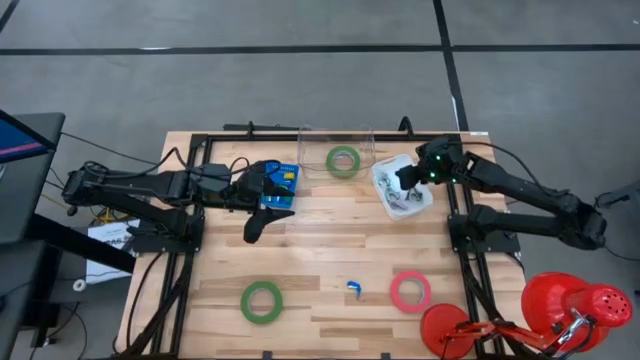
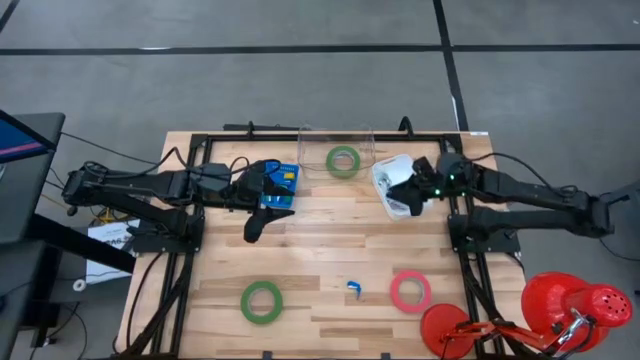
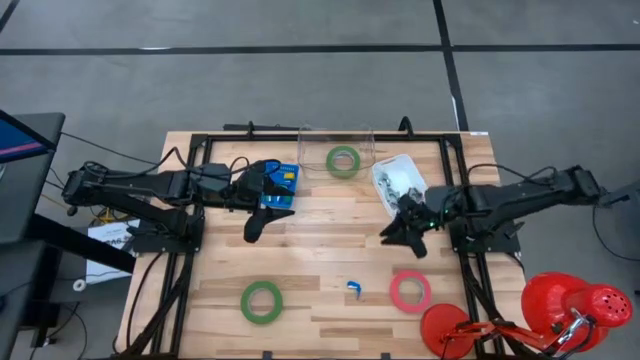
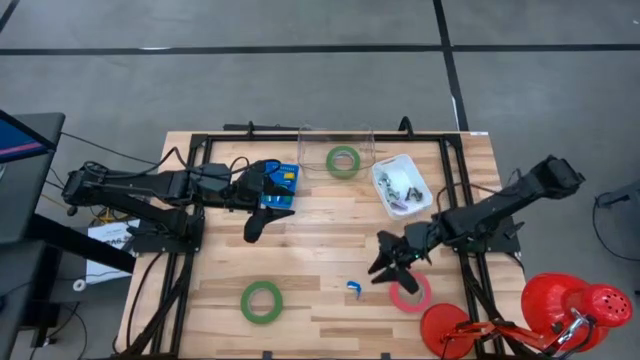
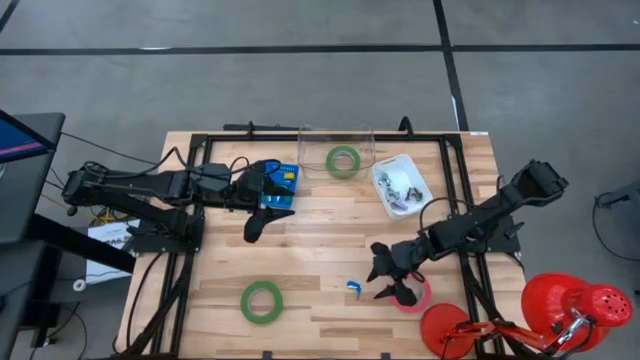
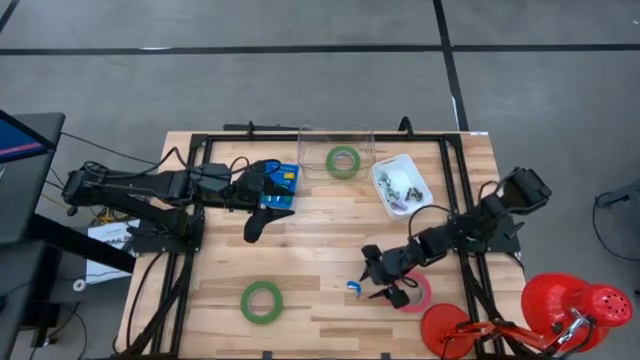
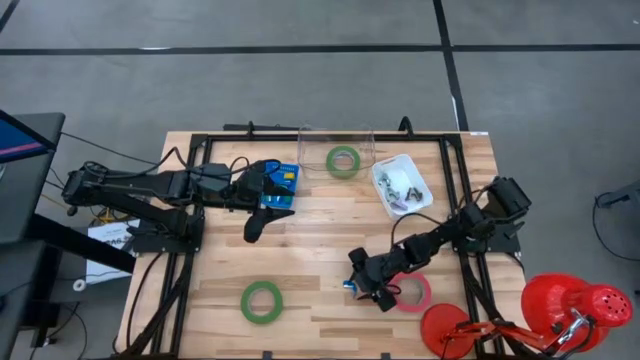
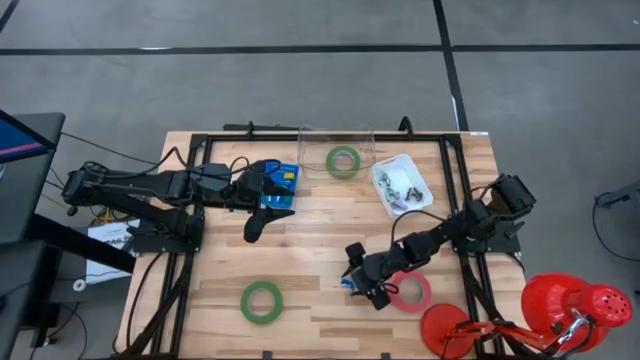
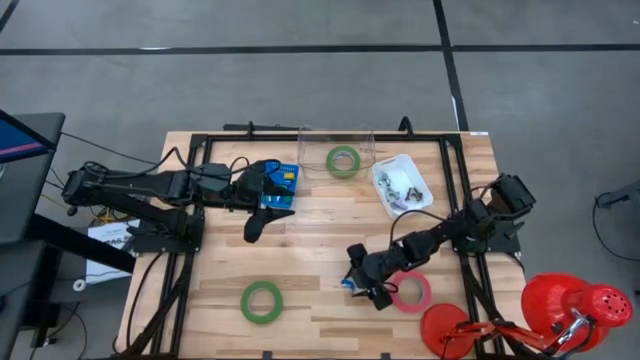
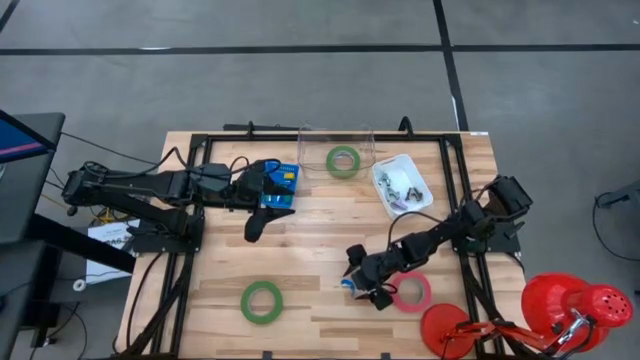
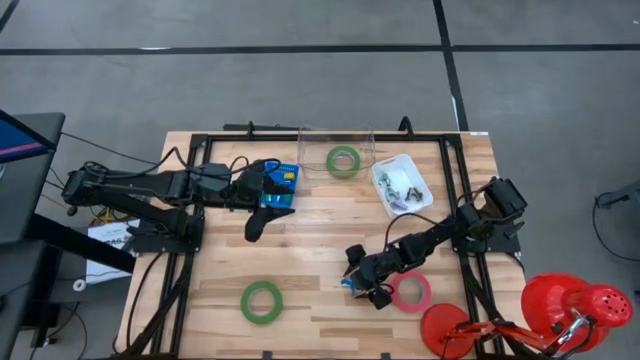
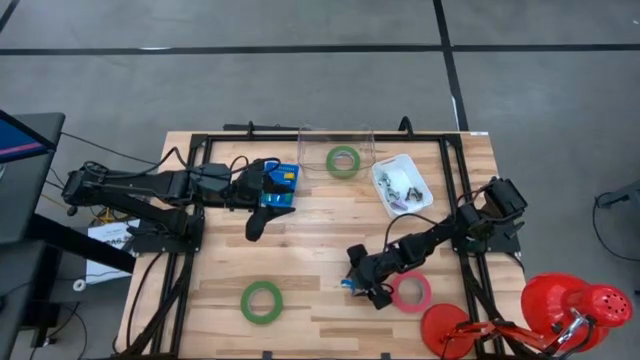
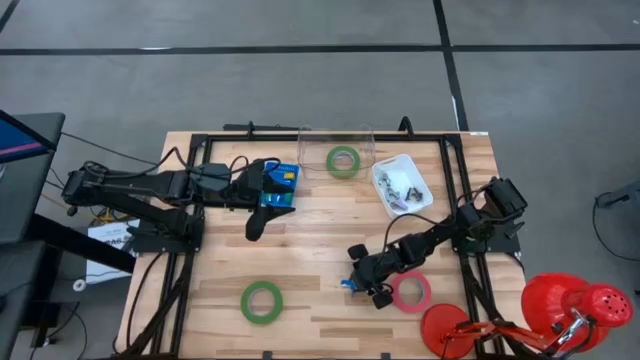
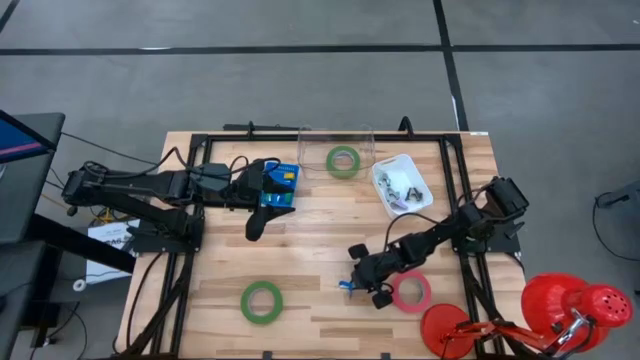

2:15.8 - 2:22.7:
Task: Pick and place Stapler, Stapler remover, tape
Put the blue stapler into the blue bin

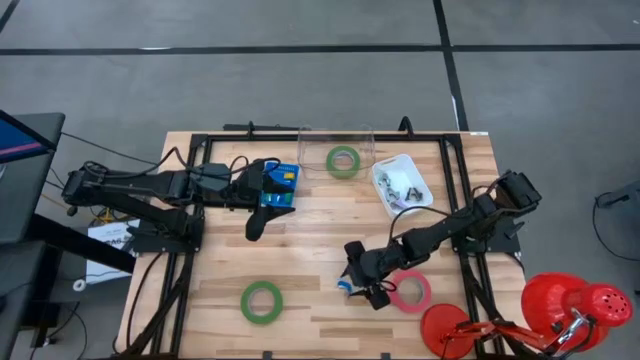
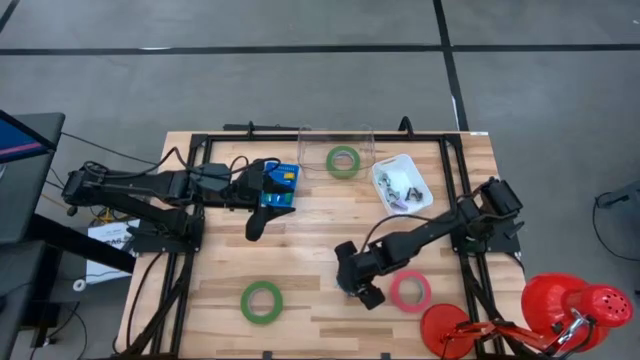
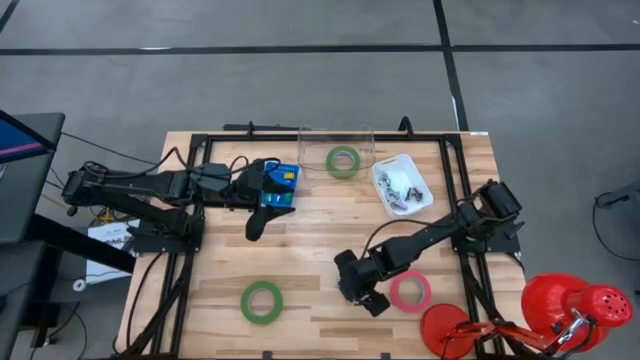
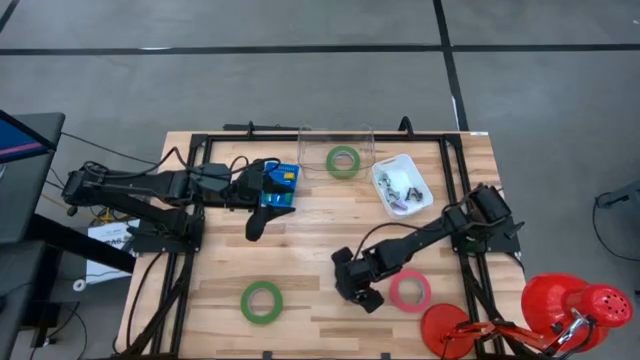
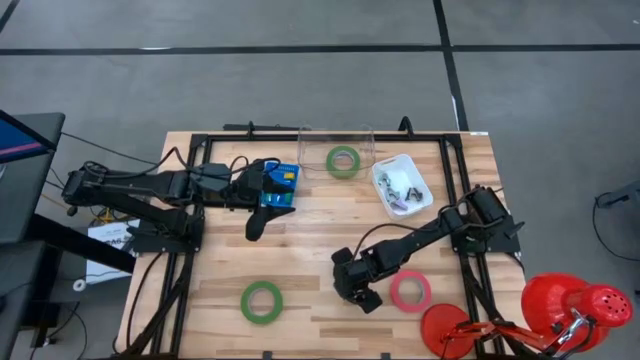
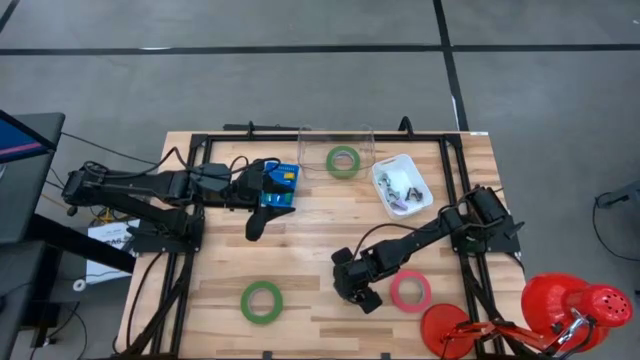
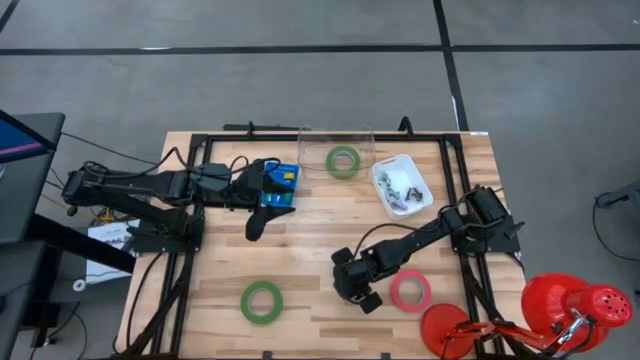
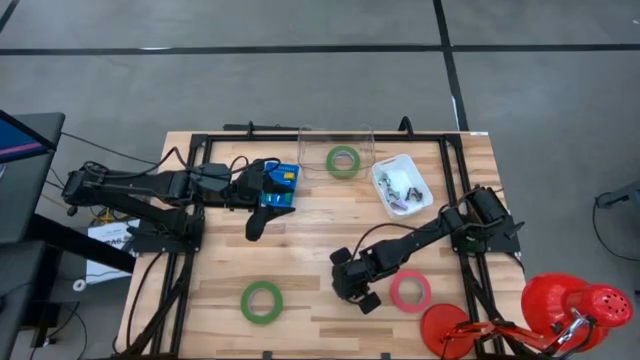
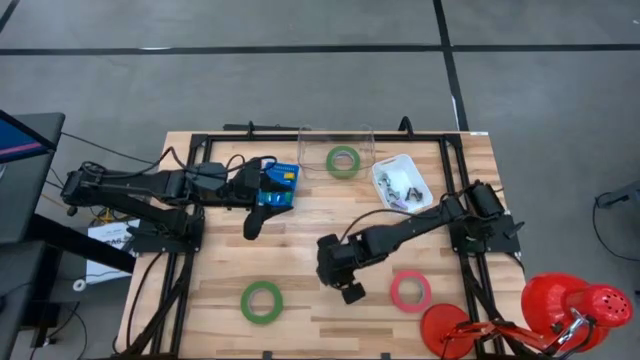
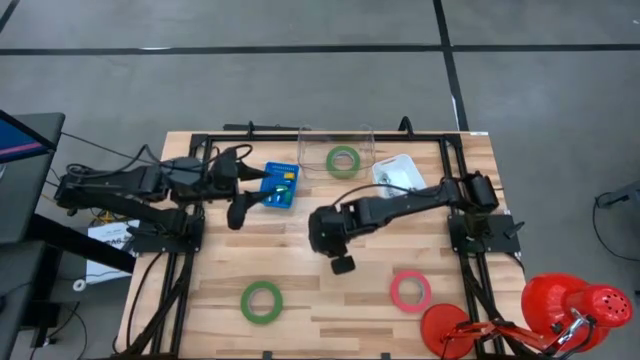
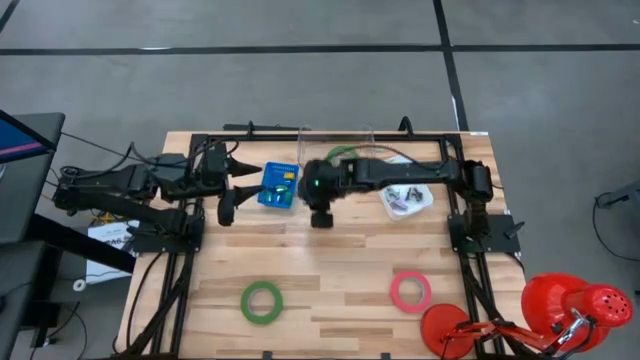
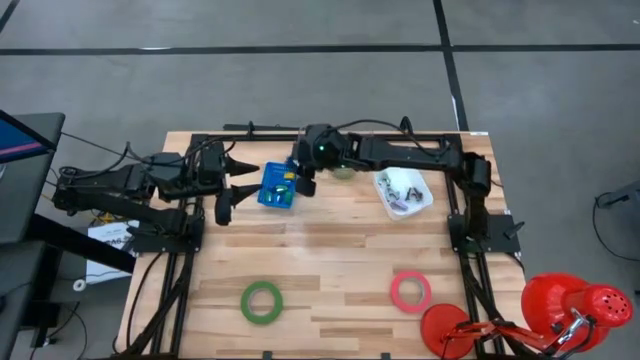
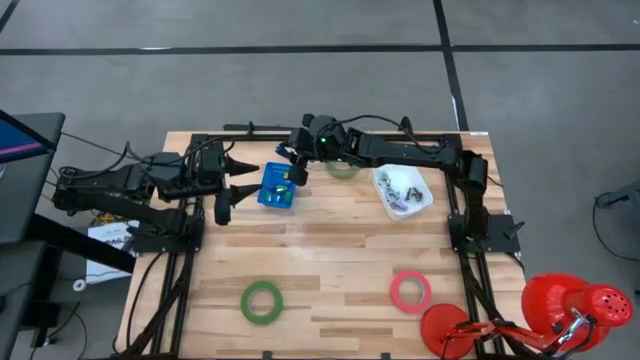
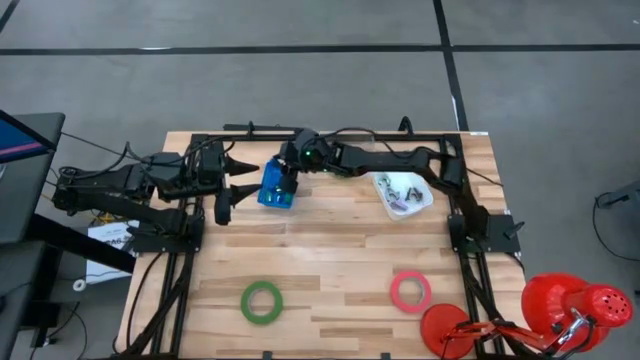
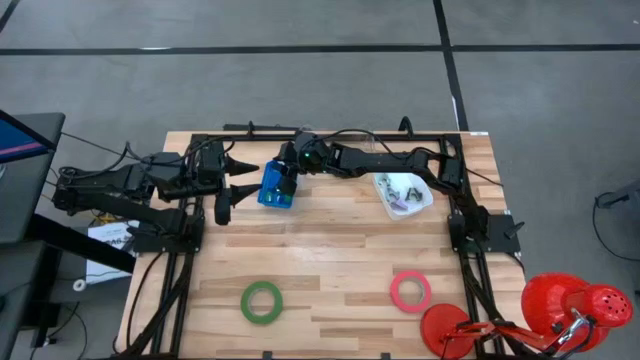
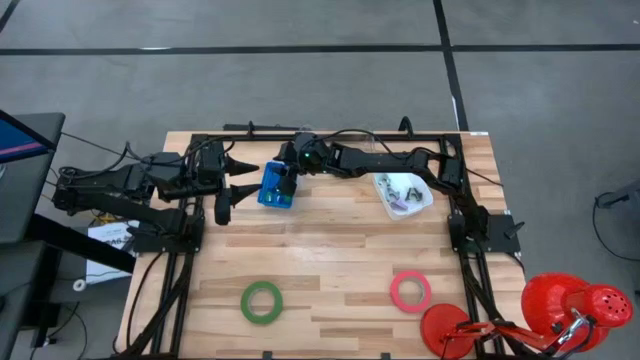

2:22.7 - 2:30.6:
Put the blue stapler into the blue bin

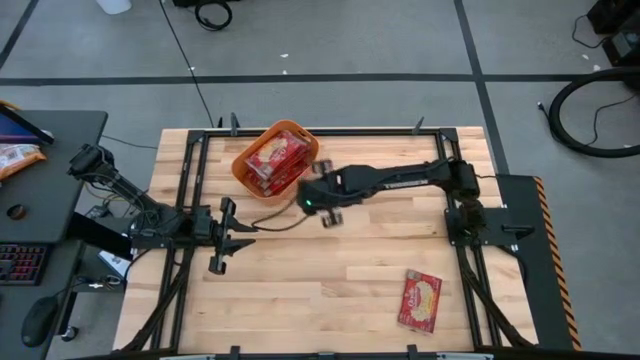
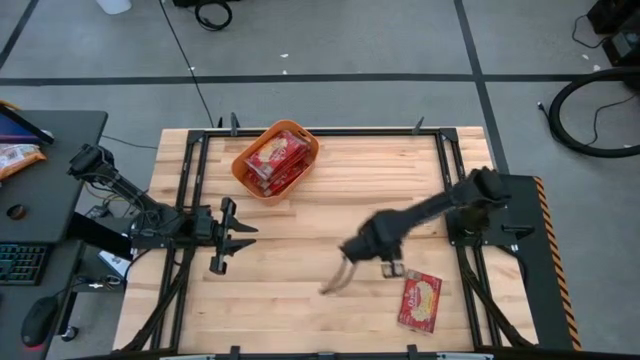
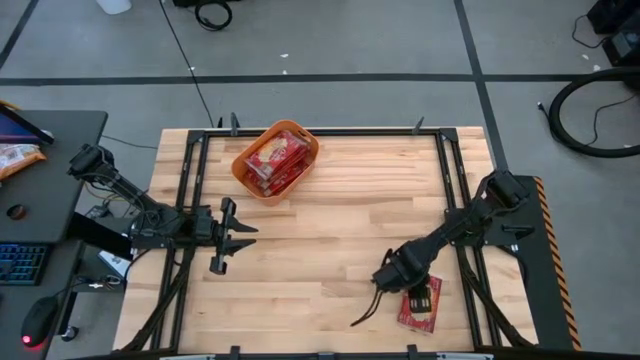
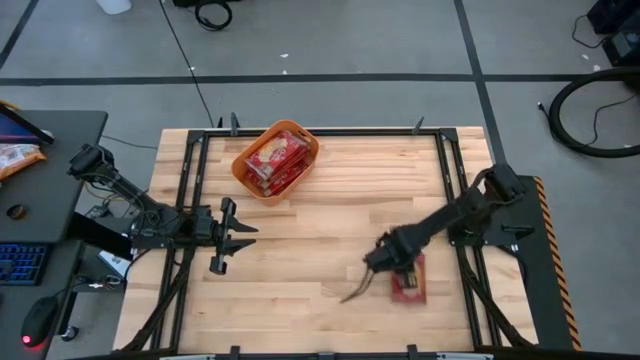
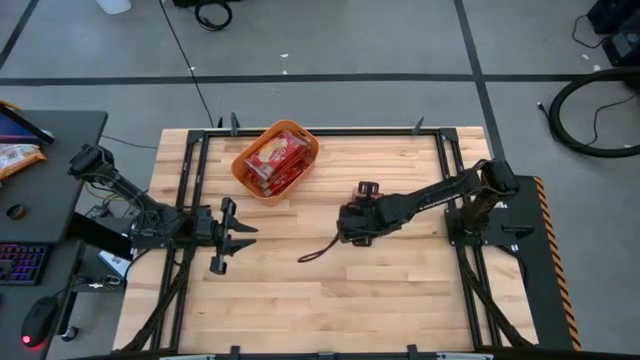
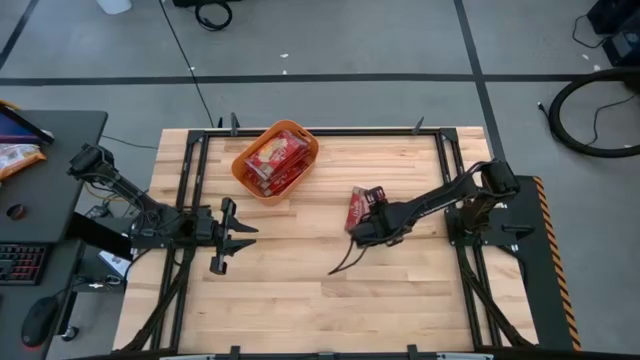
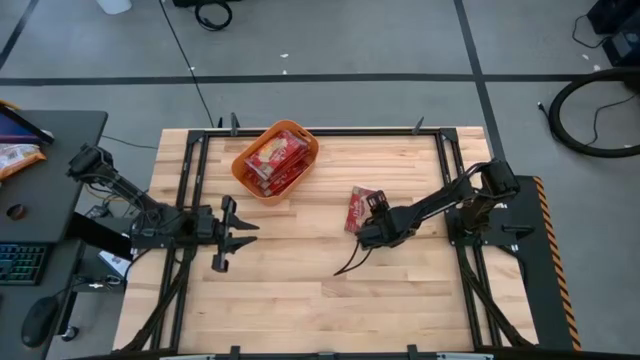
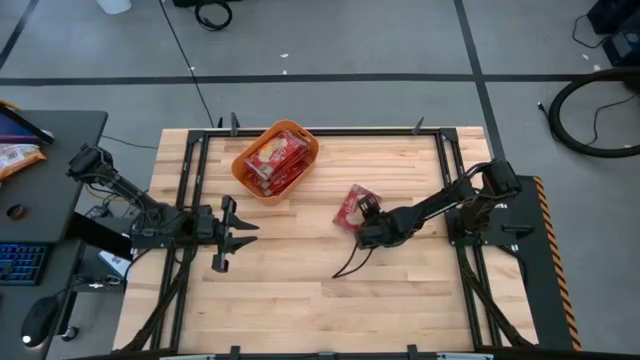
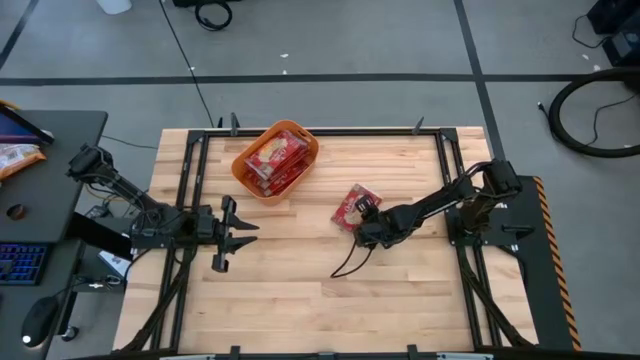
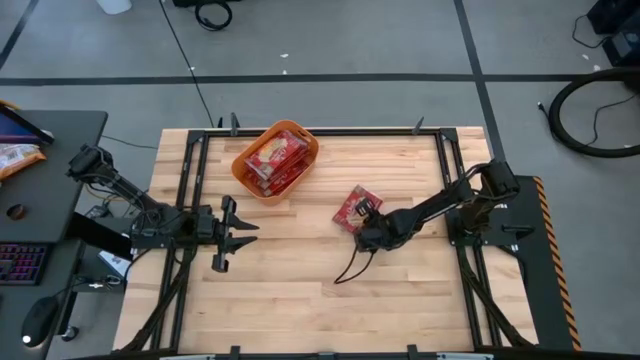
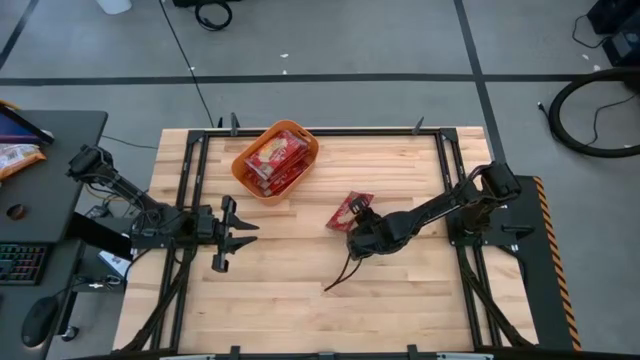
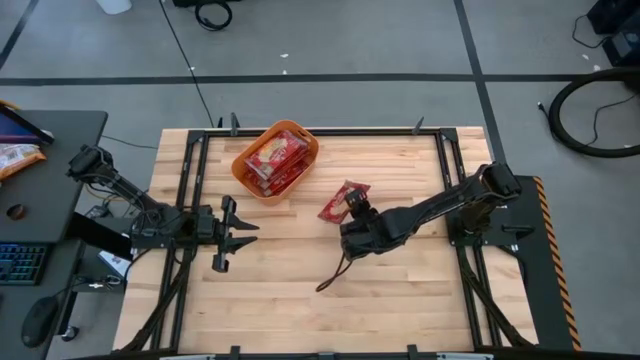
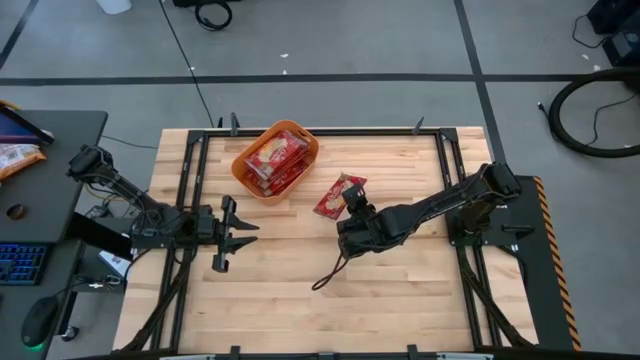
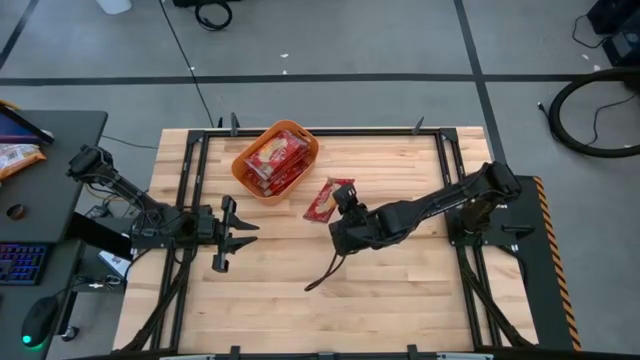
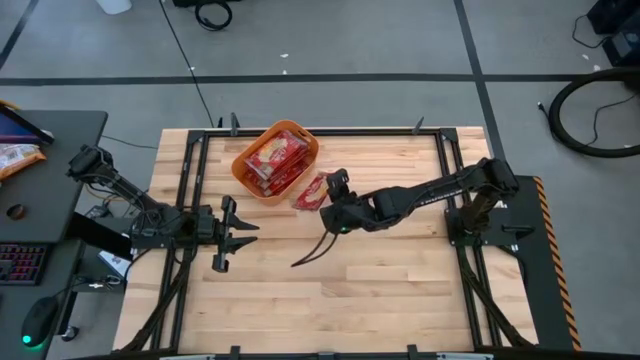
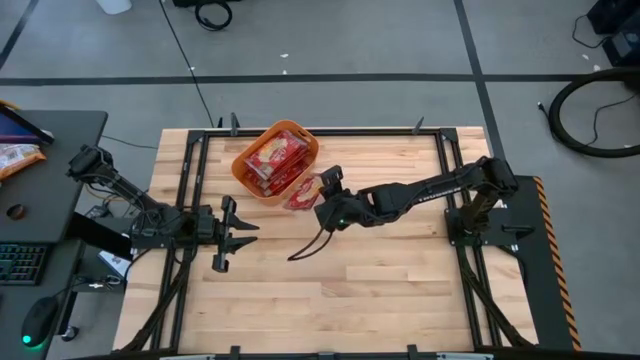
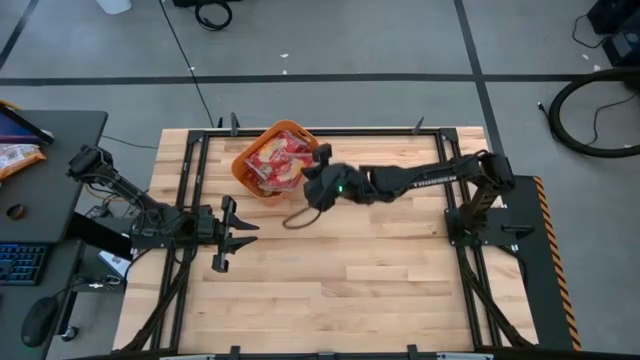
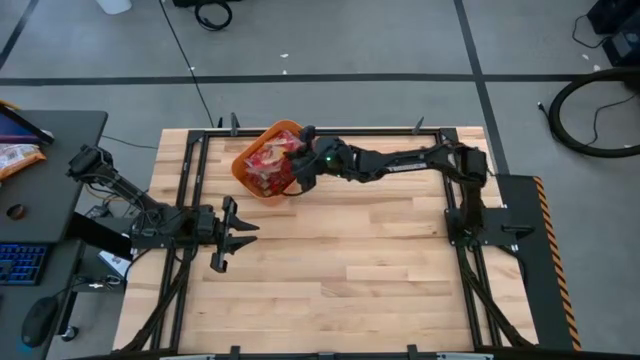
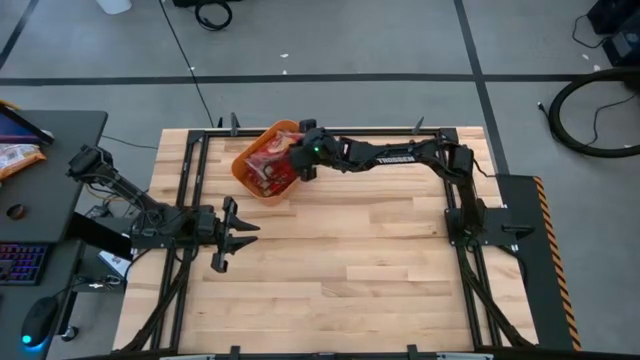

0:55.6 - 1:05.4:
Task: Sort popcorn bags into baskets
Put the red popcorn bag into the orange bin
